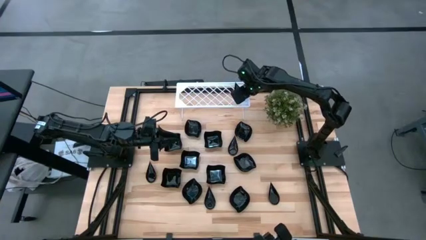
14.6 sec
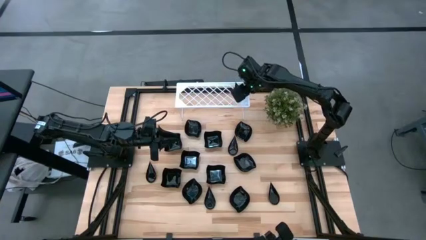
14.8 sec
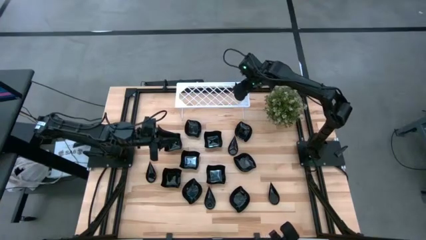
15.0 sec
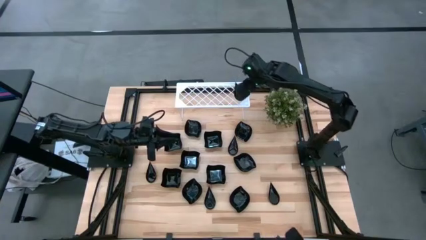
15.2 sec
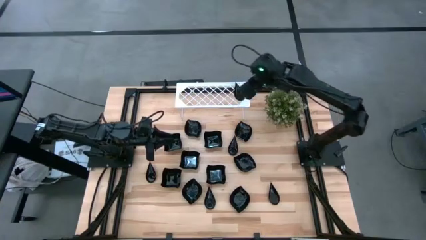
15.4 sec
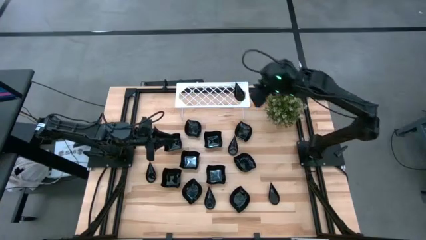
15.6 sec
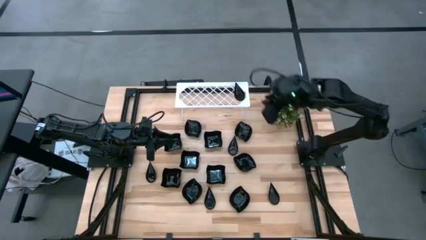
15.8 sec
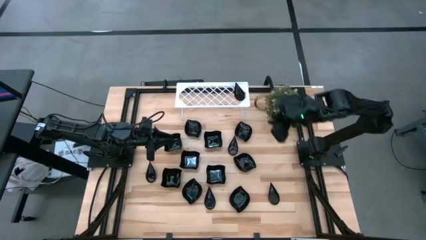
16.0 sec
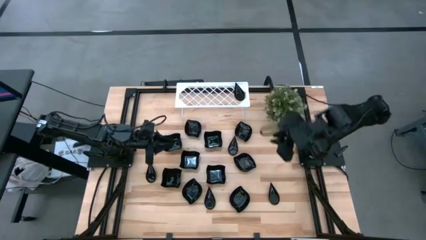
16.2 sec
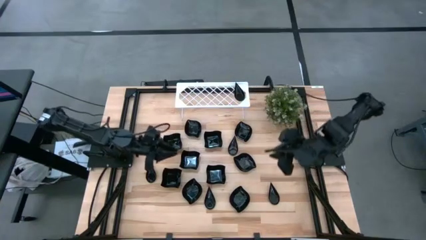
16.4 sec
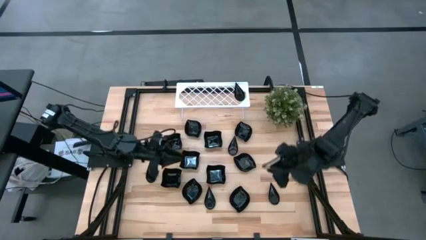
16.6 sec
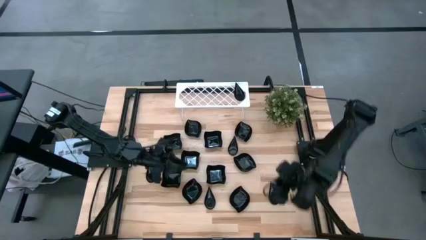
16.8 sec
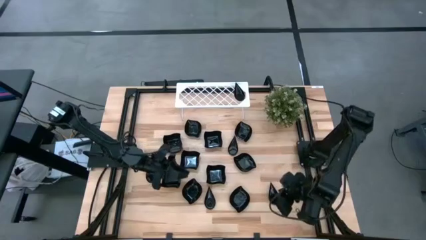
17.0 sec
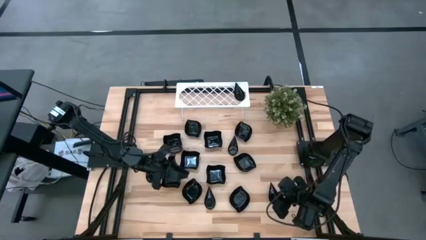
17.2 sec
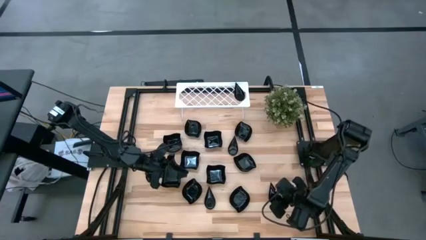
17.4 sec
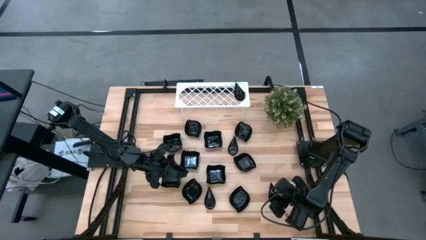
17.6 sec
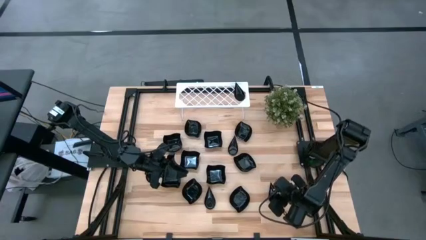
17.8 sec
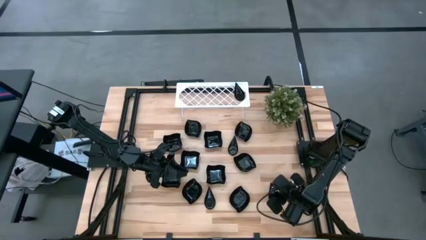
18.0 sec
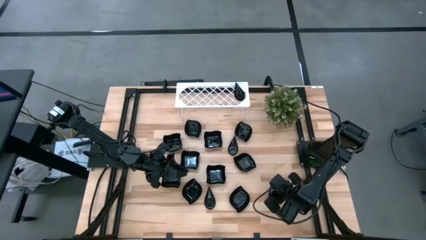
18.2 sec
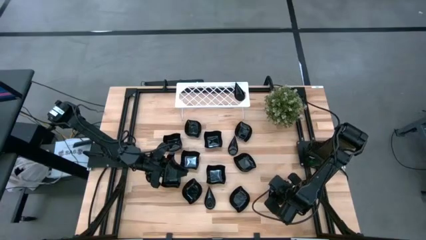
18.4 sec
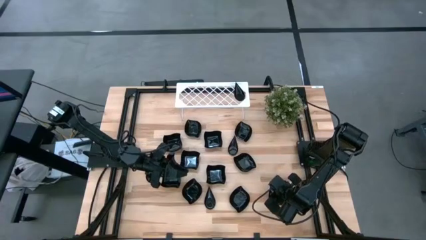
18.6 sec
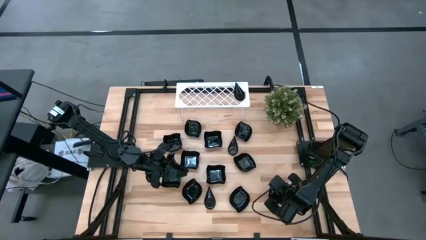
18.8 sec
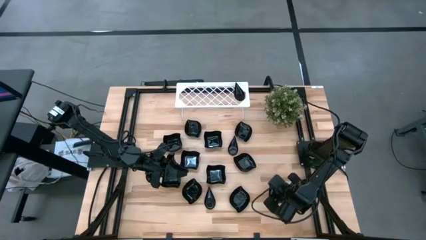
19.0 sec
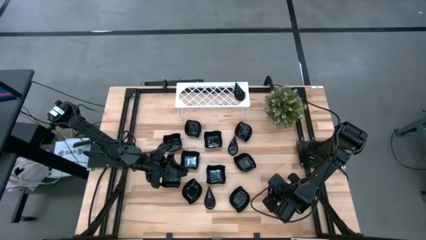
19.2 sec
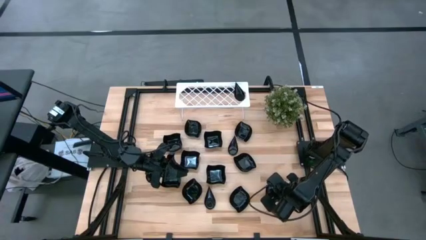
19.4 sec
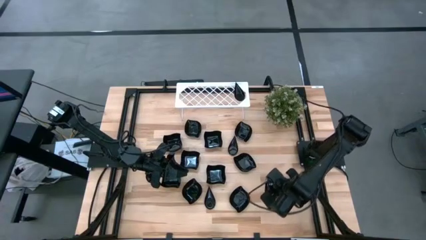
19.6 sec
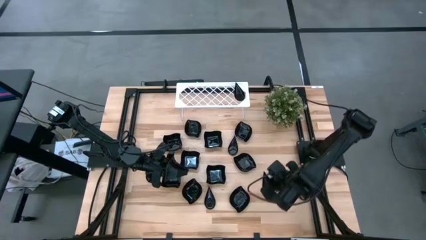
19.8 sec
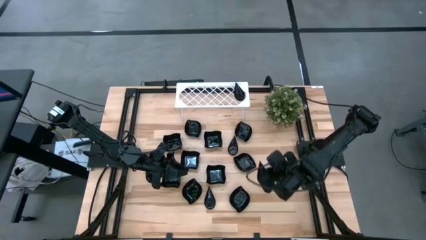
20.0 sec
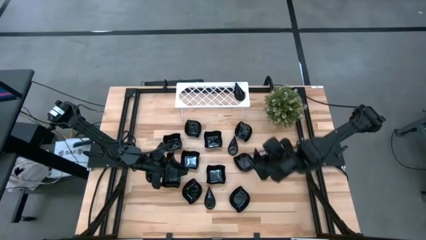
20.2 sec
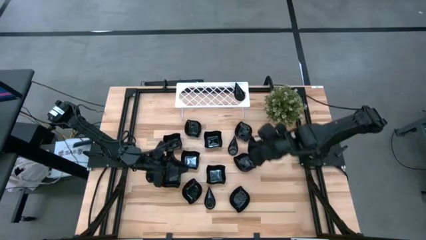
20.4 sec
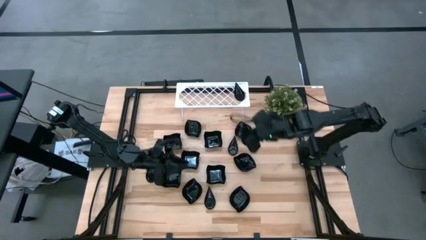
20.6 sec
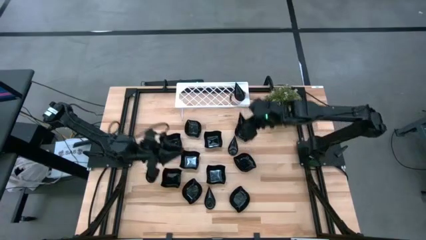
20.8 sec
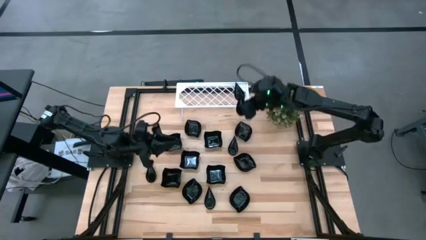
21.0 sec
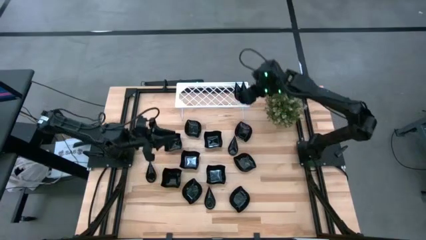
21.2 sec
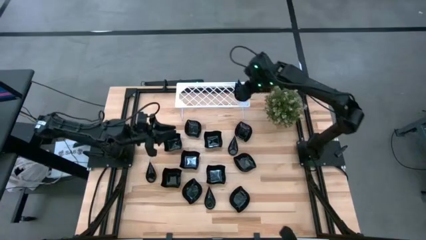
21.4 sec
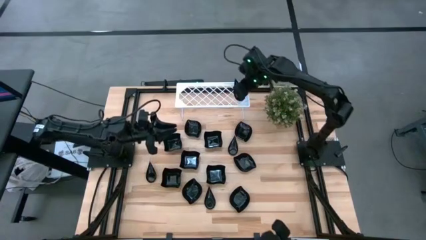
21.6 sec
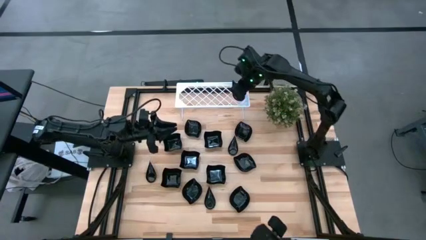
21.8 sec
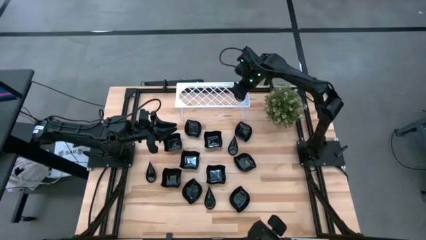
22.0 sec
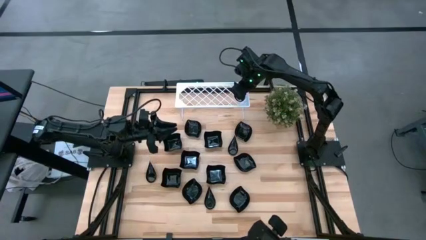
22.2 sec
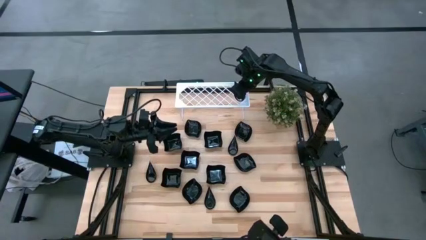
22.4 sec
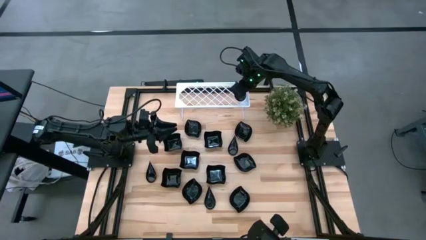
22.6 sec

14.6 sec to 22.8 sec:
Task: Pick & Place Mini shaped plates
Stack the drop-shaped plate on top of the drop-shaped plate on the shelf

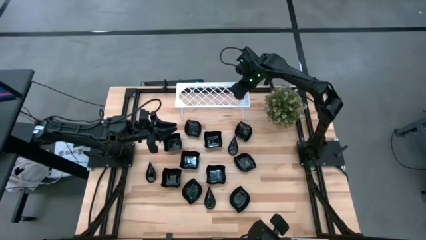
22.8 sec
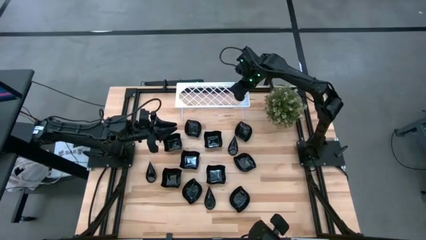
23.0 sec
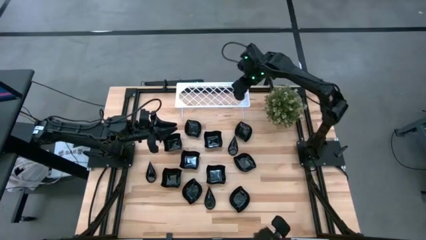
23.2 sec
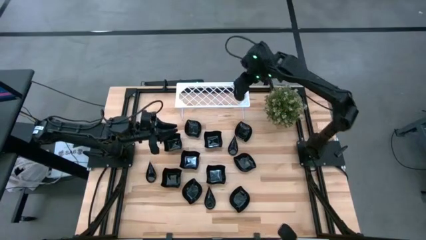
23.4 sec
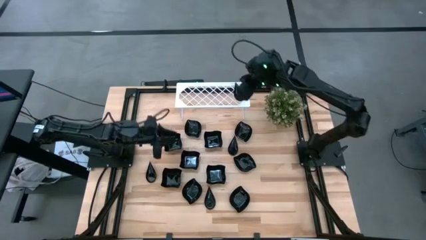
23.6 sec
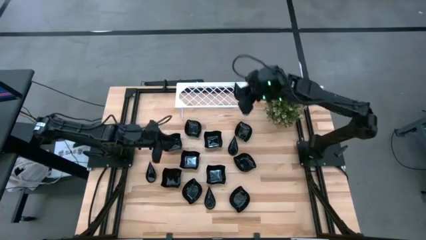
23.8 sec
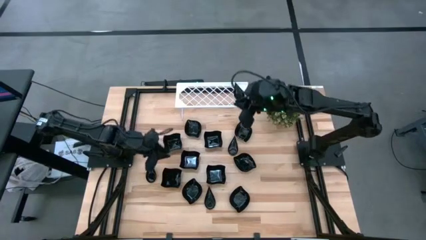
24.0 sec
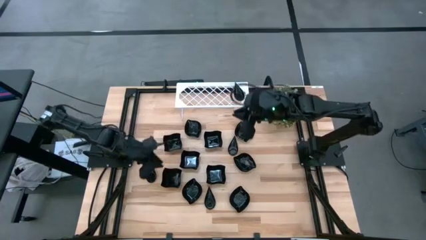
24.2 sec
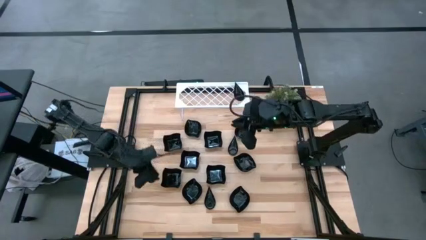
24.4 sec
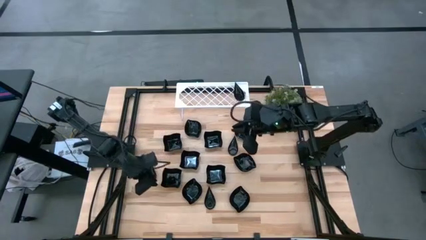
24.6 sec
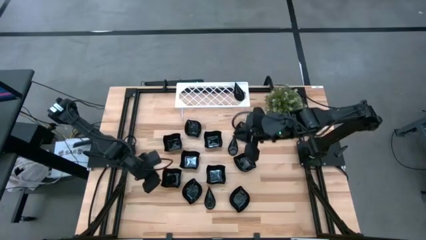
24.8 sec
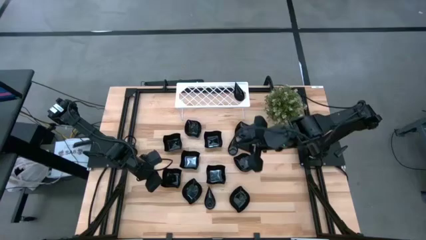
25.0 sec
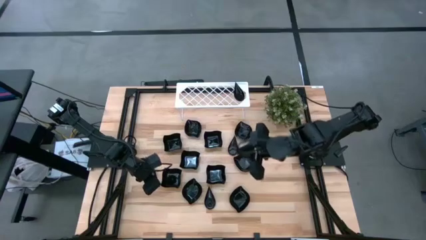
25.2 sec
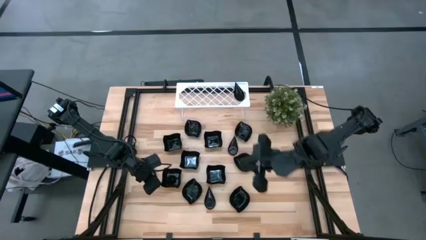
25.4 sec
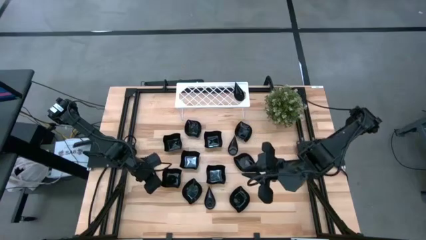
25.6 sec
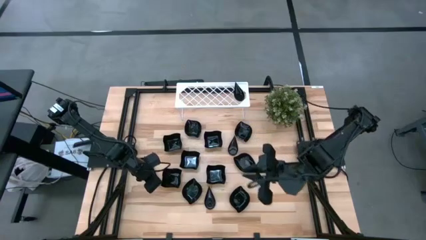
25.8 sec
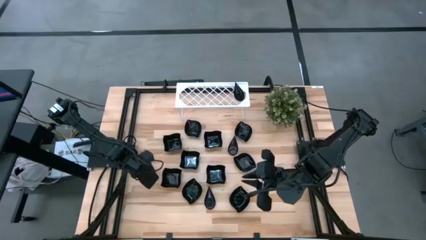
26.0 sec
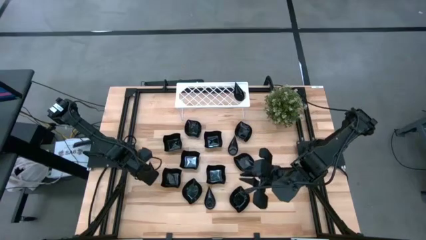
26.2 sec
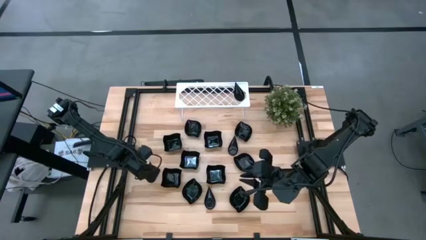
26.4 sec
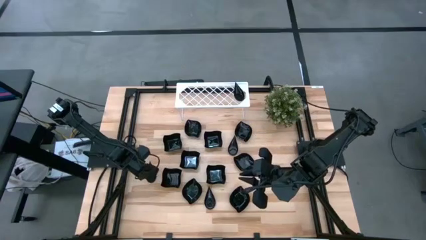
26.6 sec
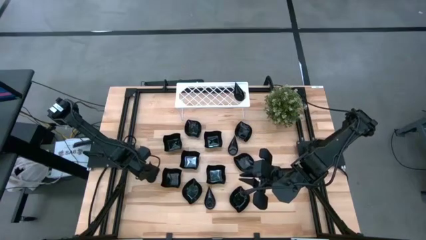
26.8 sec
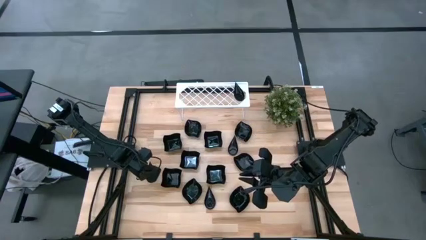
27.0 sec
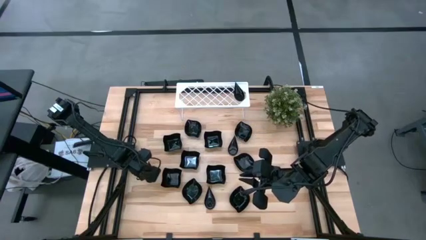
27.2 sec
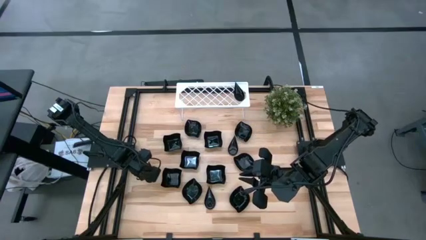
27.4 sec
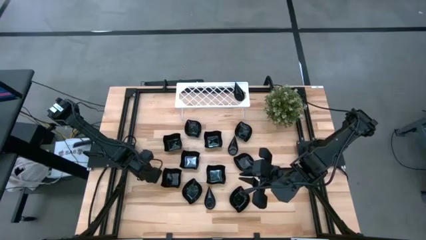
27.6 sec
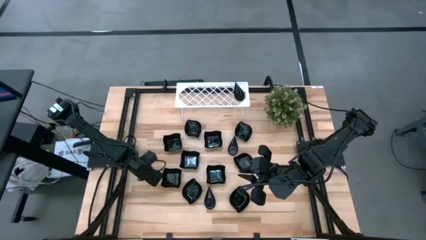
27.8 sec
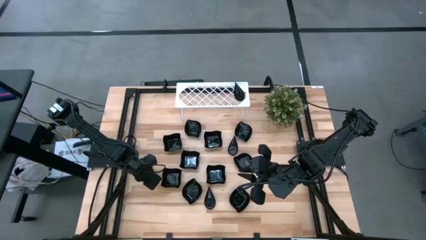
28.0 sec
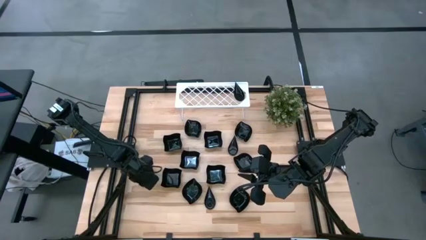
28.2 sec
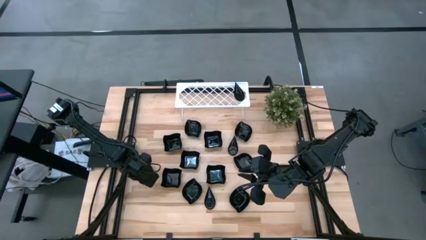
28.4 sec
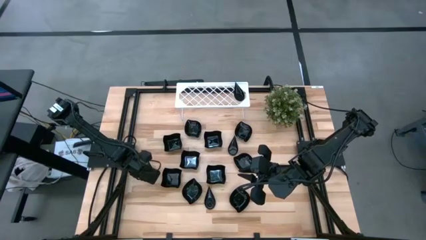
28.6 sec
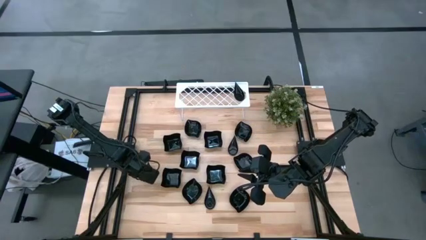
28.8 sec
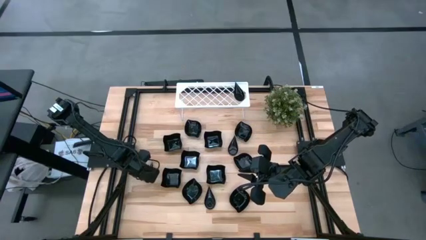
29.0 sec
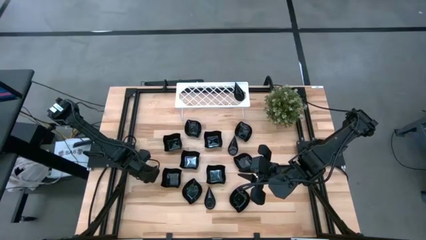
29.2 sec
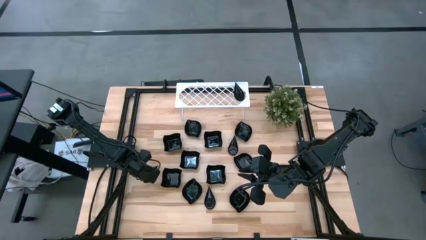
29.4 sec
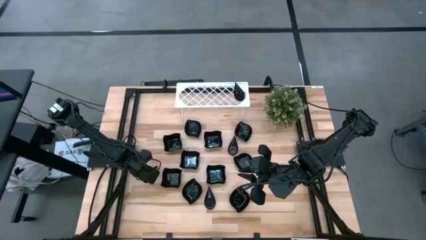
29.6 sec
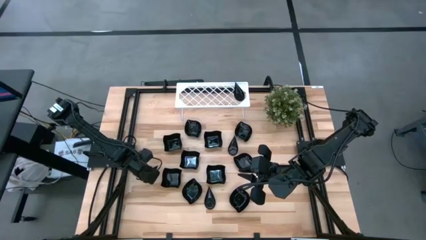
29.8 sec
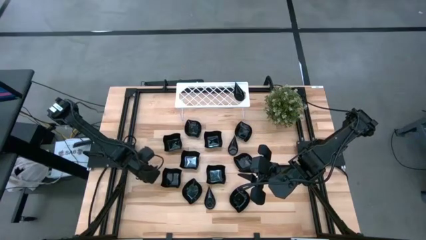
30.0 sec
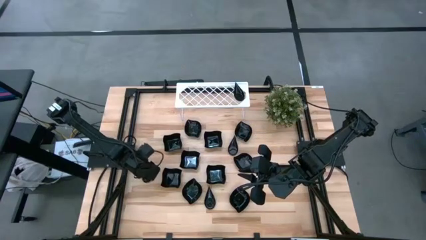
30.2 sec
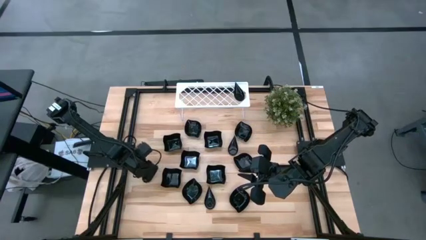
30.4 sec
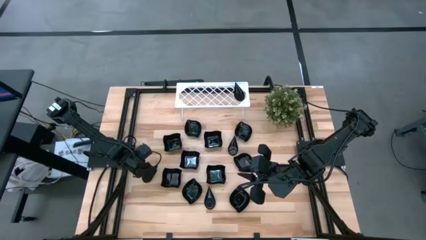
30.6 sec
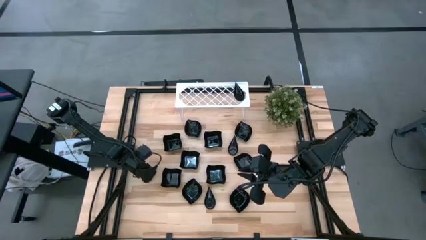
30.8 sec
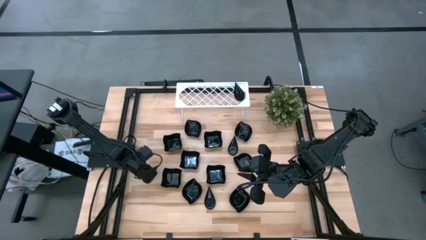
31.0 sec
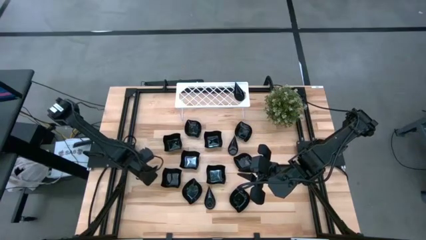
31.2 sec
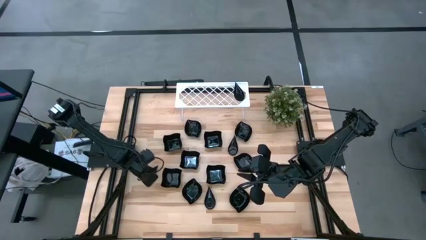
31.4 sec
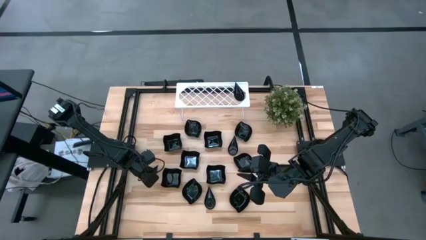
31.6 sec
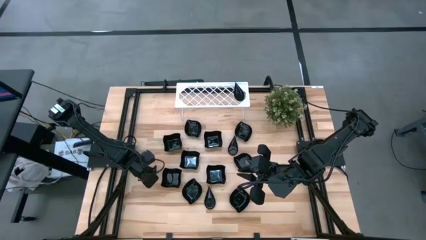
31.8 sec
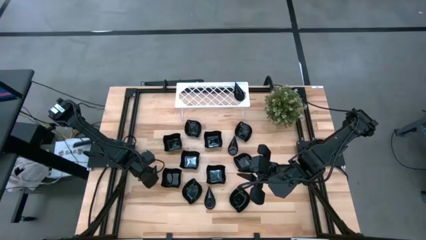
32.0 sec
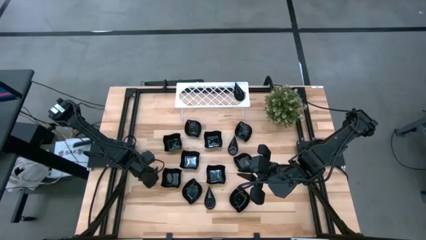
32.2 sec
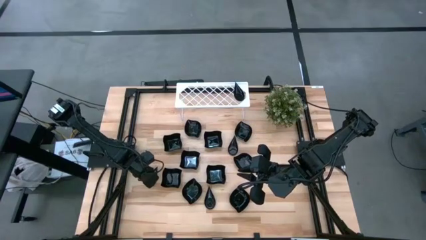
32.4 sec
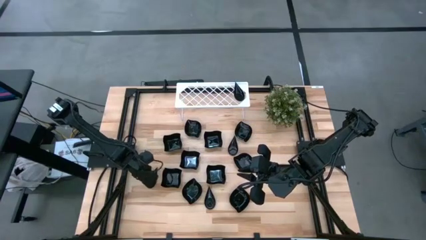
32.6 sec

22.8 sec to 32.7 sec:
Stack the drop-shaped plate on top of the drop-shaped plate on the shelf
